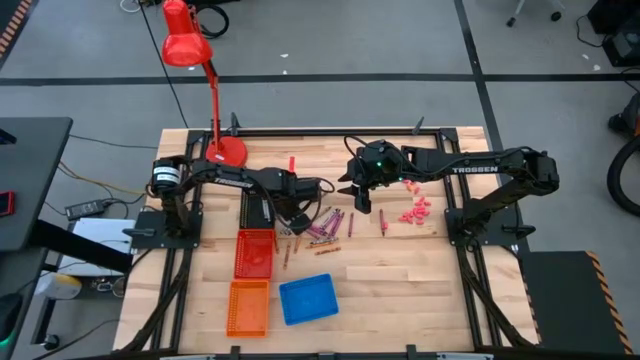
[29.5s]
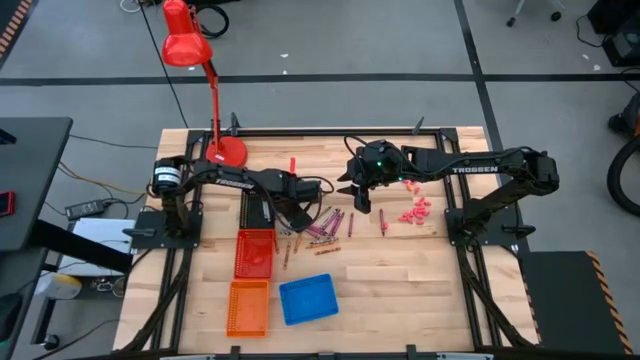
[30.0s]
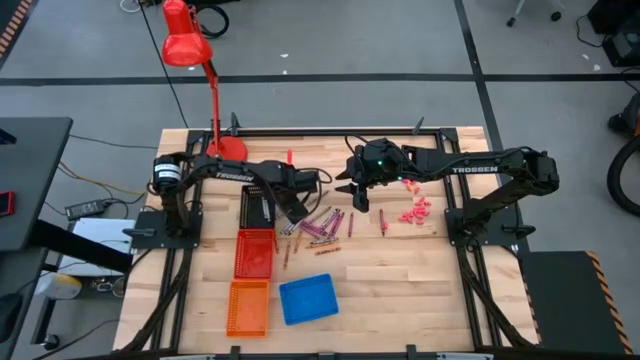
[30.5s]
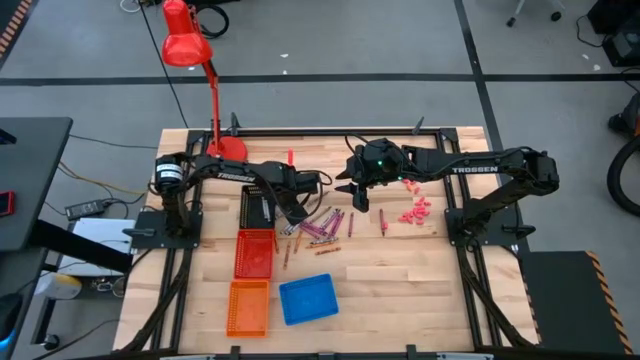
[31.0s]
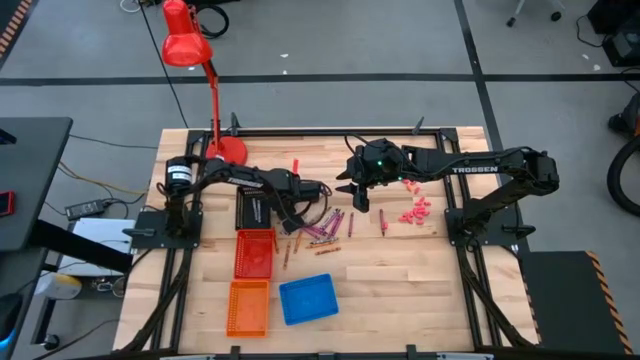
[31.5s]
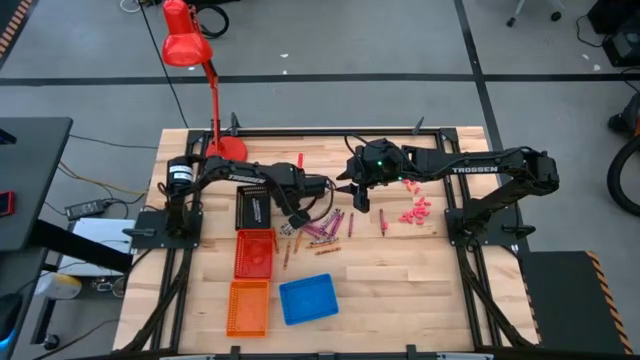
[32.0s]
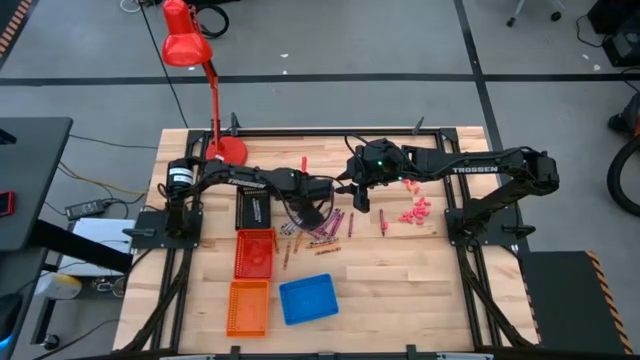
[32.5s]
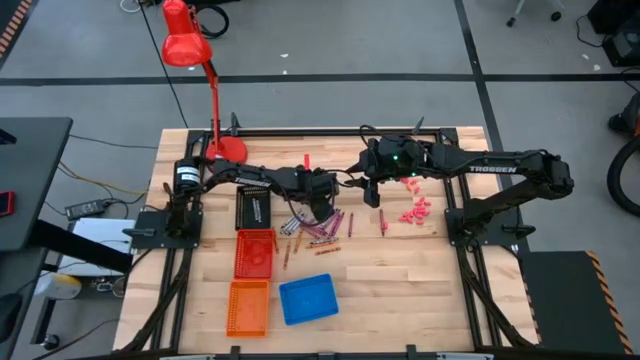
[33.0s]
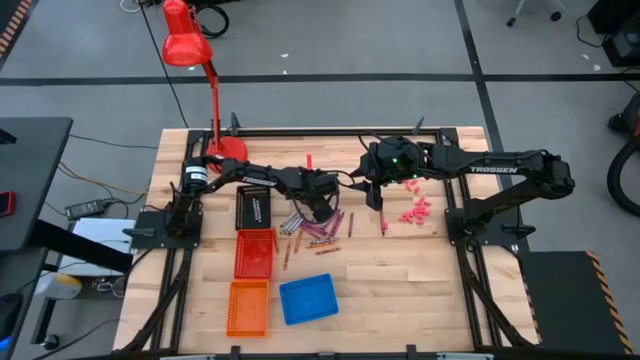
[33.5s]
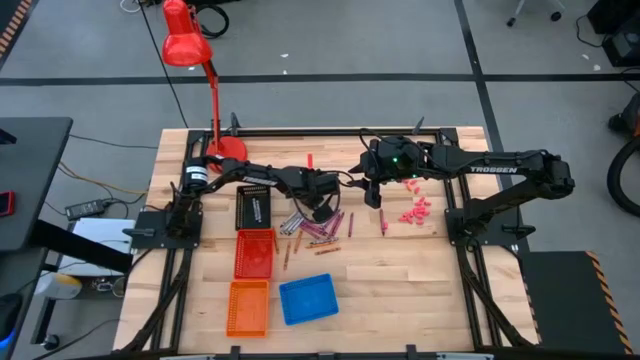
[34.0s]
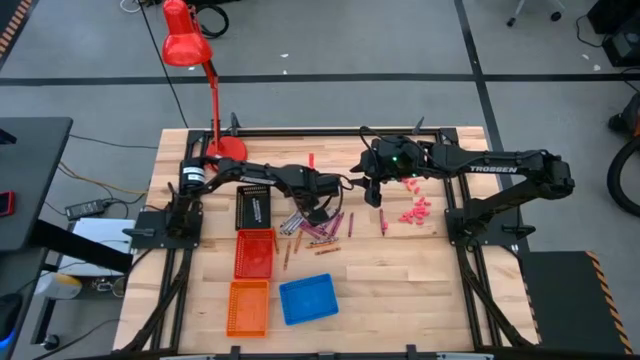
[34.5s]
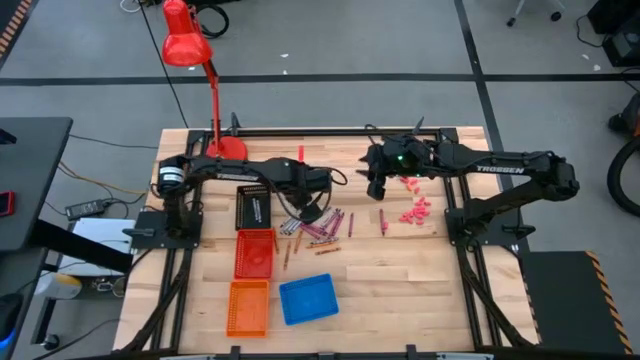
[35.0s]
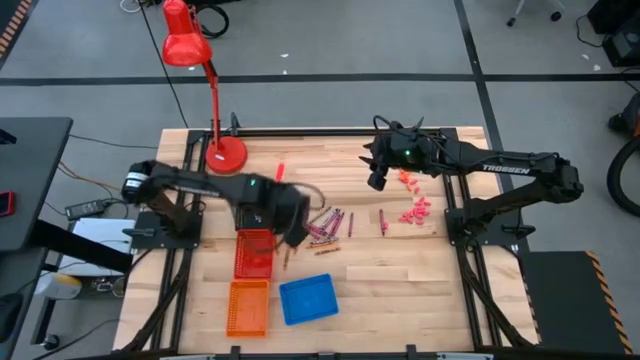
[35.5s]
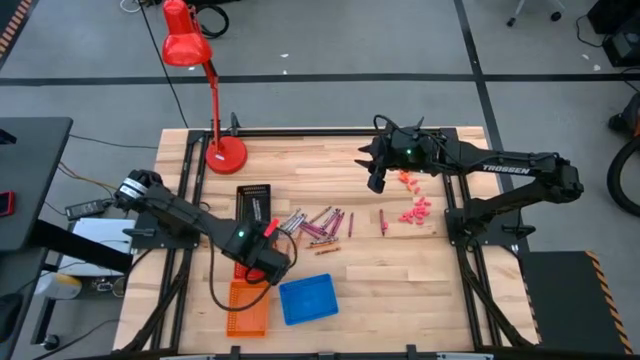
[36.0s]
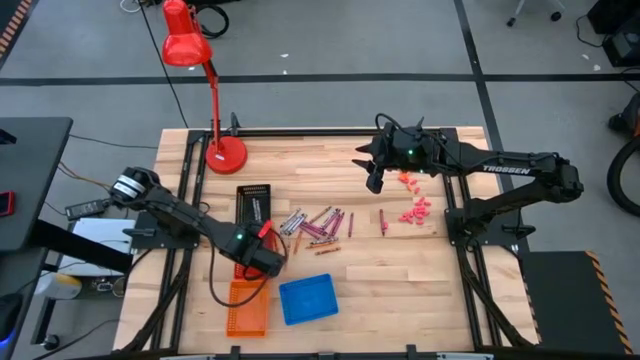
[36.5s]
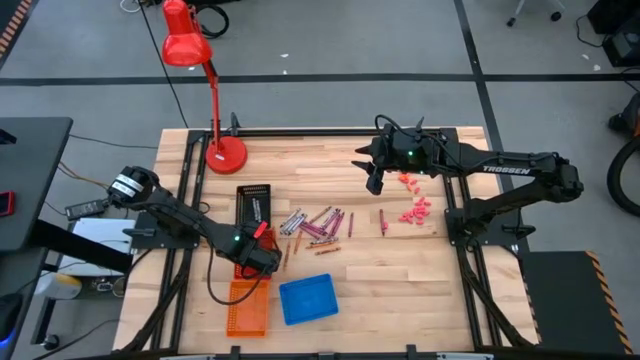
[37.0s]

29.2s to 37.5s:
Task: Sort crayons
Put the brown crayon into the red bin

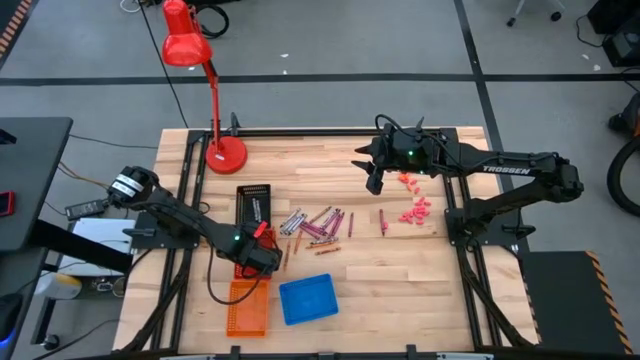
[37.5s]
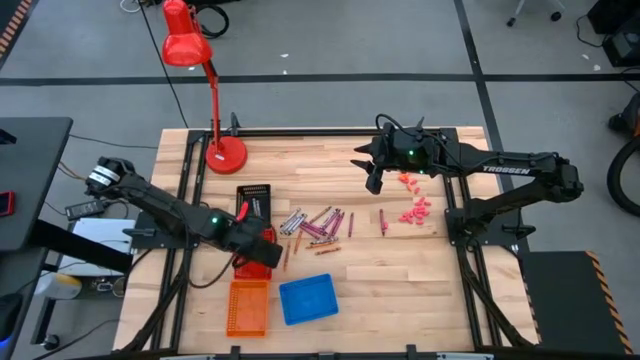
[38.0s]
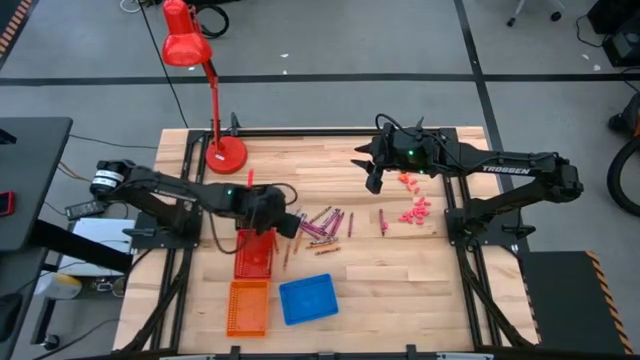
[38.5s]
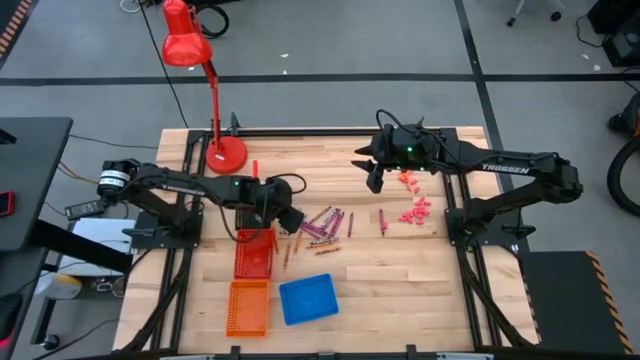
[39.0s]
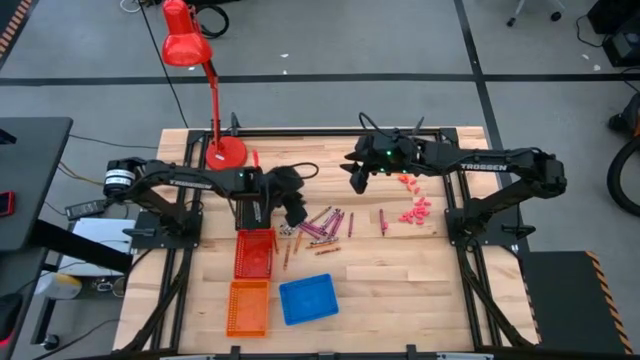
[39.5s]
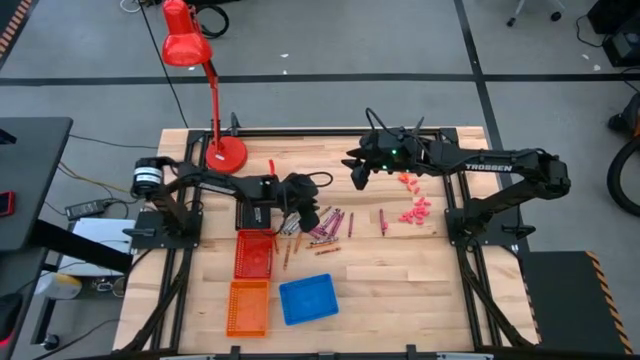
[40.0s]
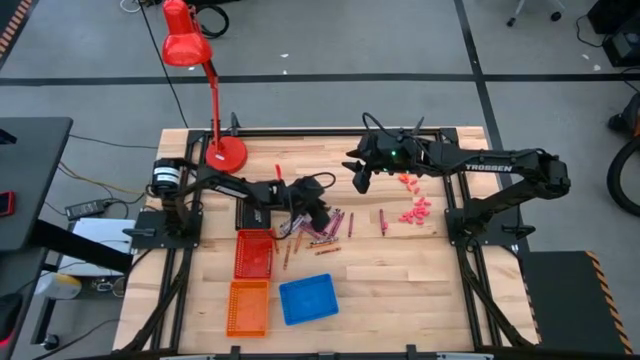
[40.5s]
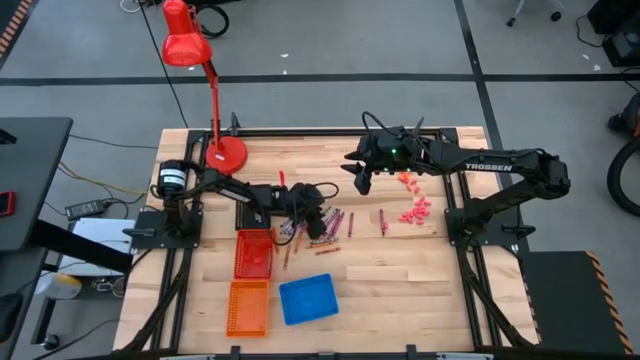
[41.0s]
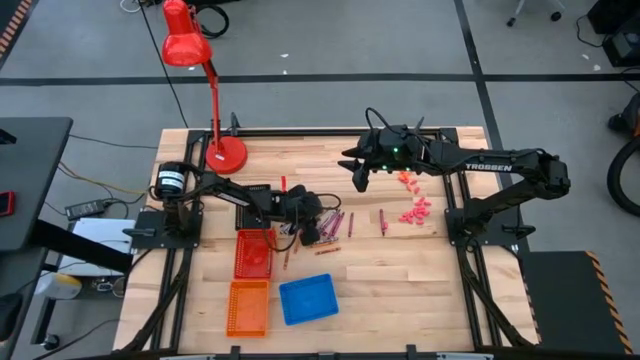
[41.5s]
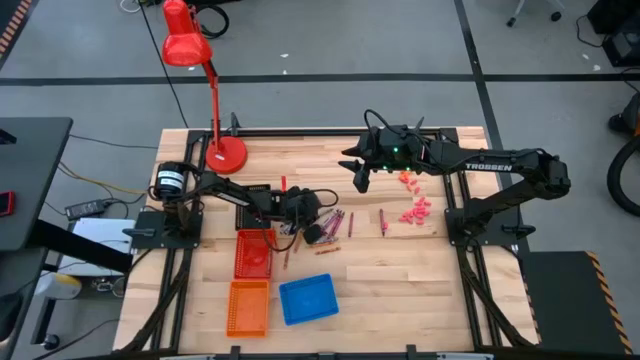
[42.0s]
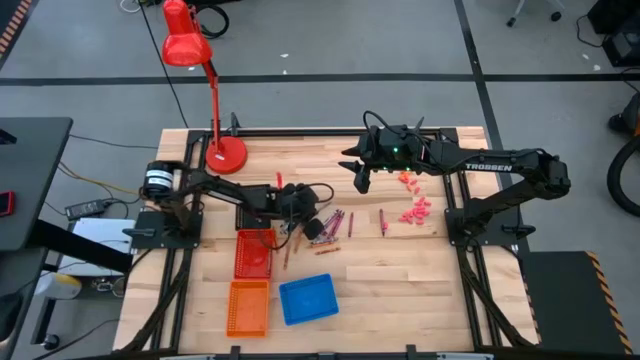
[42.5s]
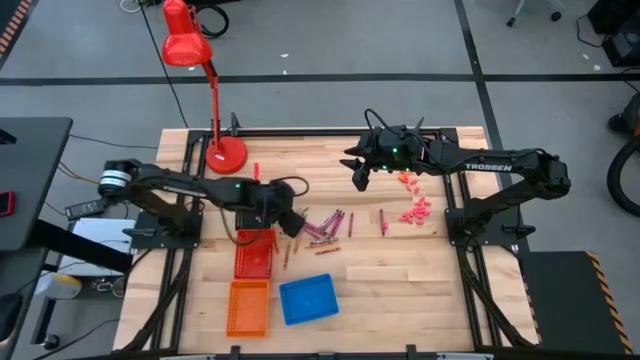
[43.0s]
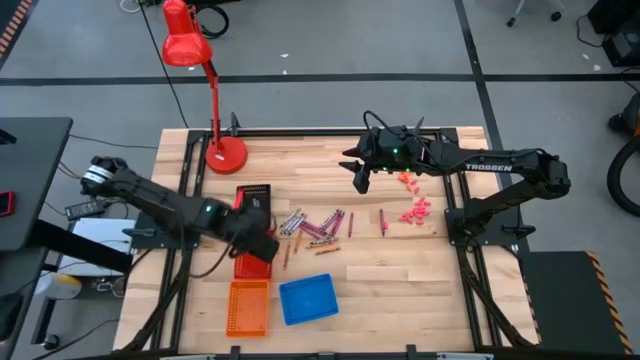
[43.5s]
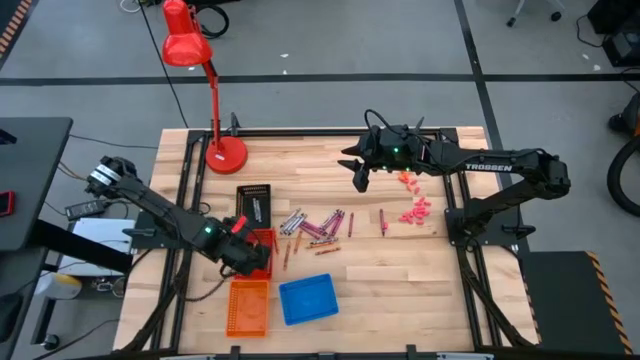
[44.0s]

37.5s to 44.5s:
Put the brown crayon into the red bin

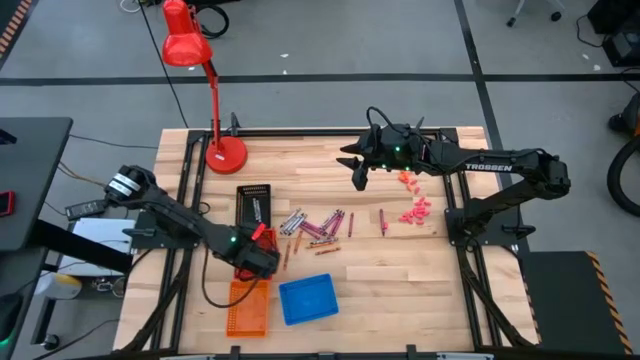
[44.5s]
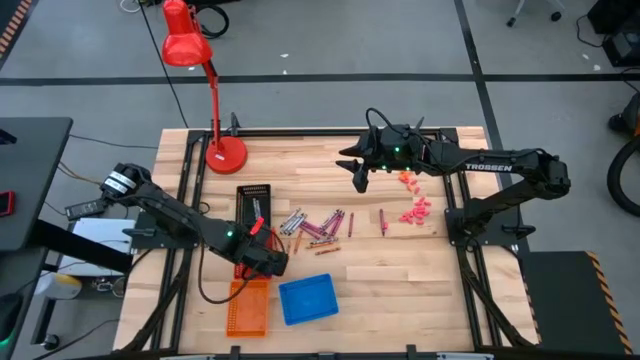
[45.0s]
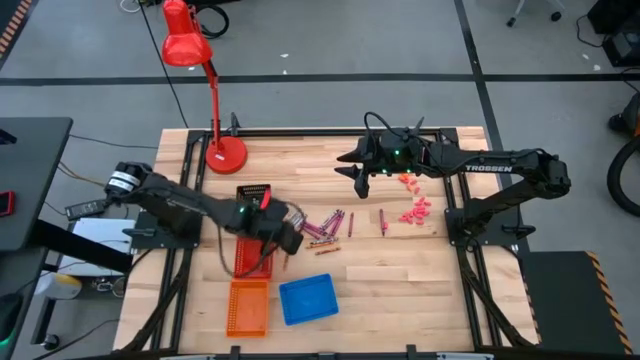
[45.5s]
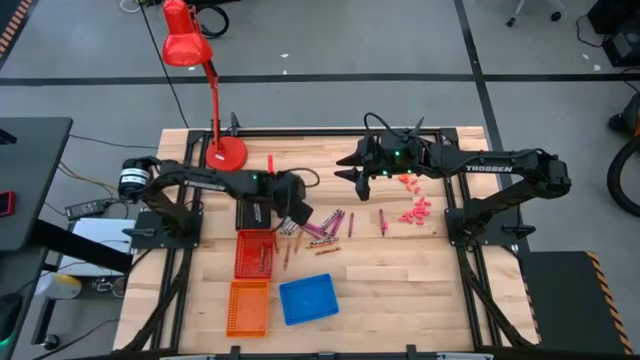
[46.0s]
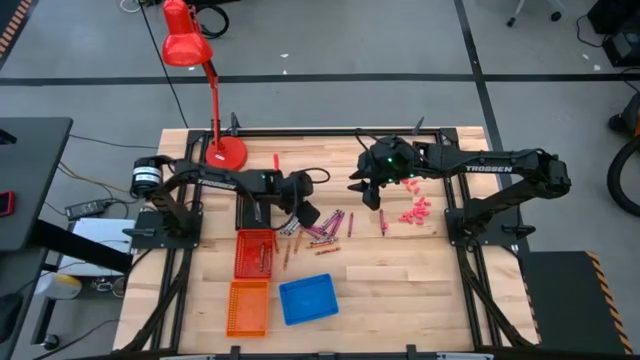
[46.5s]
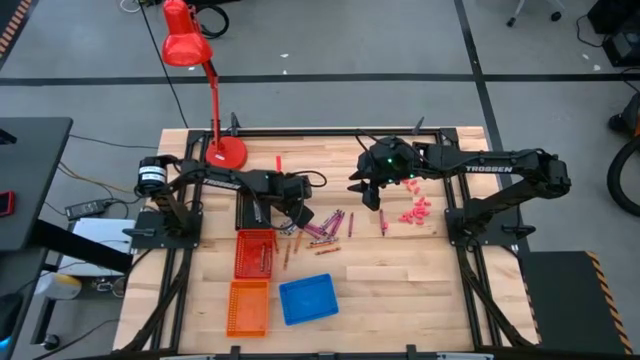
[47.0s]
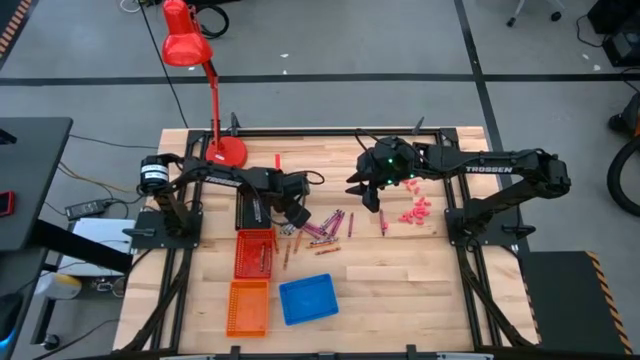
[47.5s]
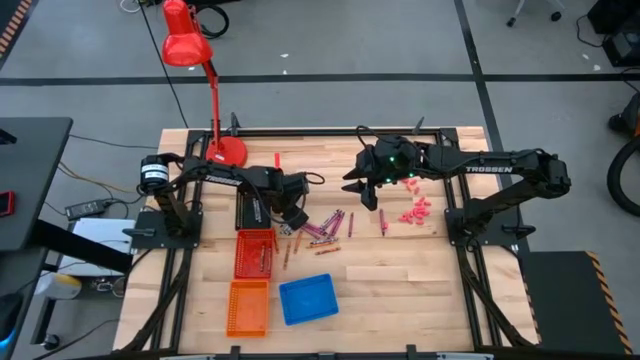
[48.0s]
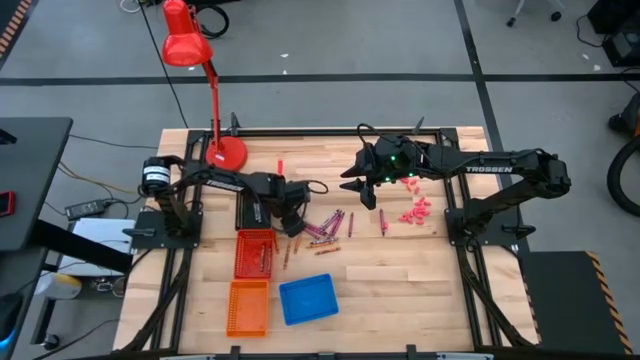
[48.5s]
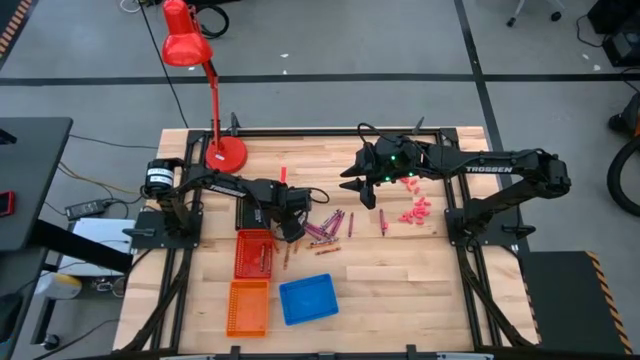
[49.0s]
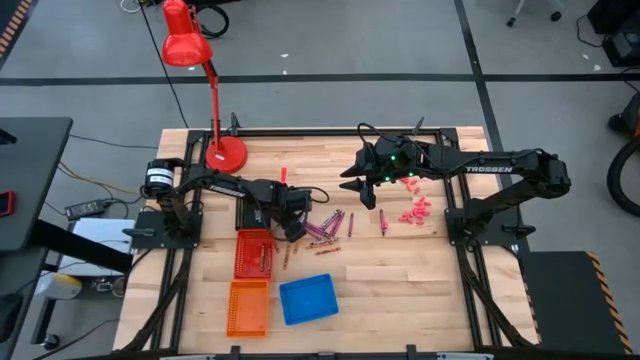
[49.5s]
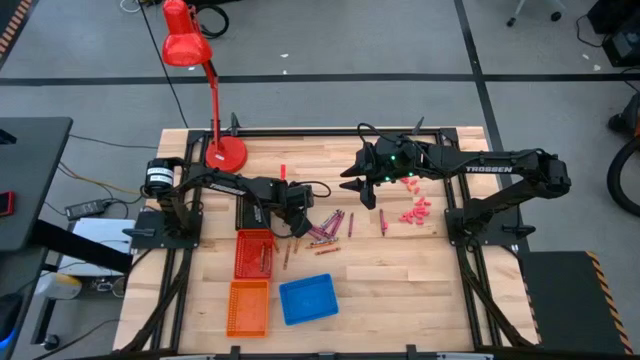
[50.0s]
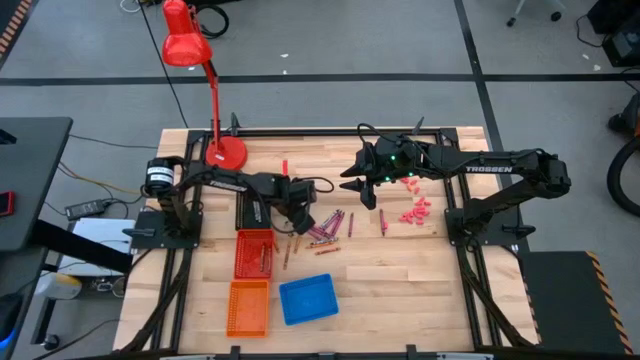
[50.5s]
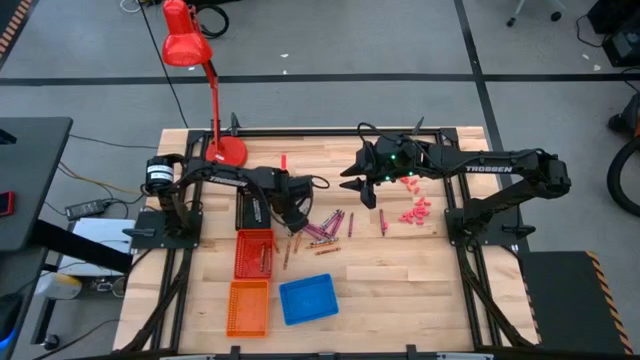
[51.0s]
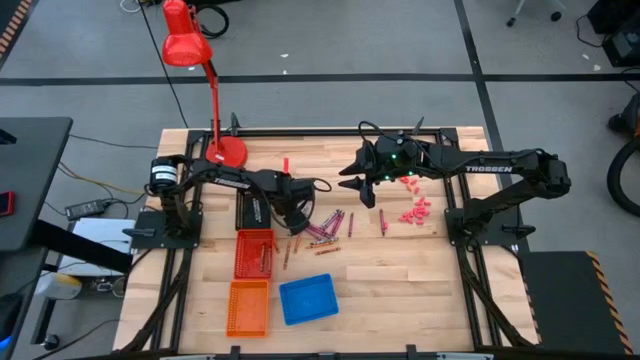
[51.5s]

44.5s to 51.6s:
Put the black crayon into the black bin
